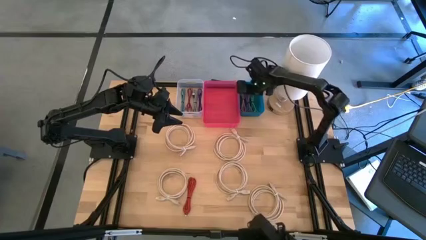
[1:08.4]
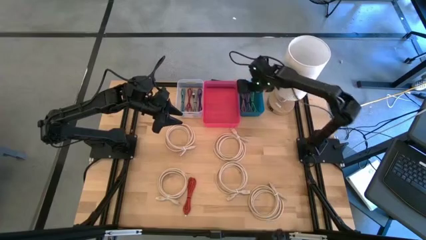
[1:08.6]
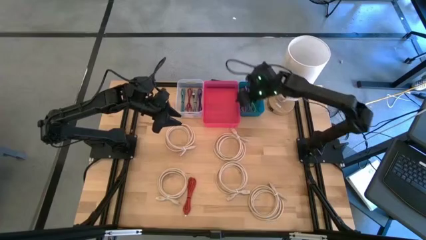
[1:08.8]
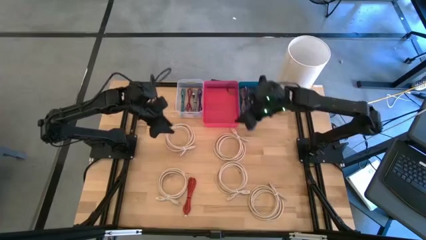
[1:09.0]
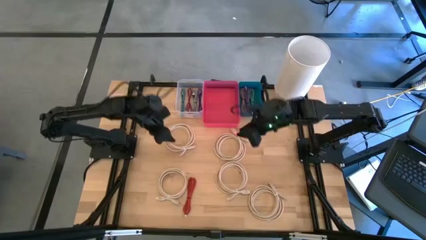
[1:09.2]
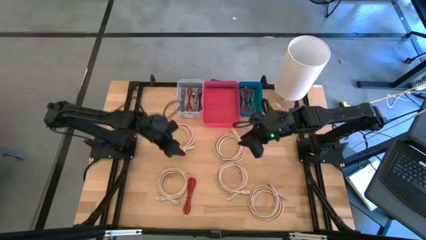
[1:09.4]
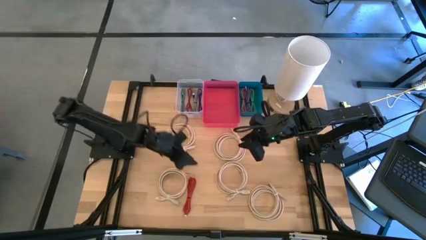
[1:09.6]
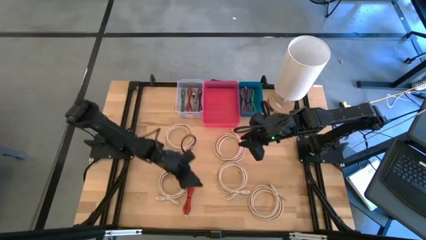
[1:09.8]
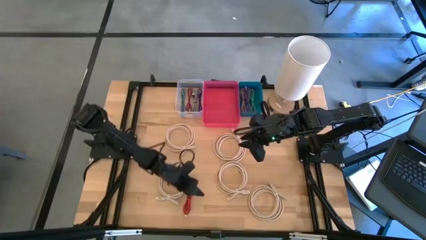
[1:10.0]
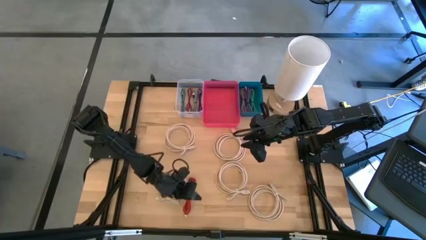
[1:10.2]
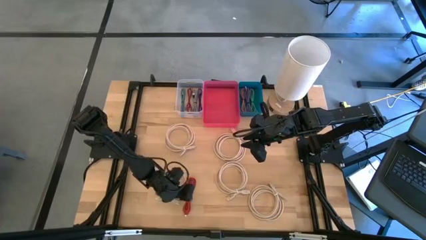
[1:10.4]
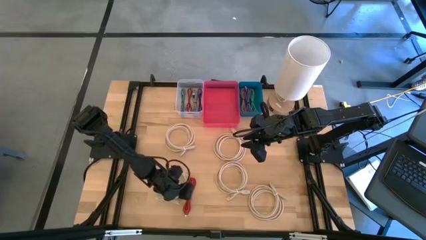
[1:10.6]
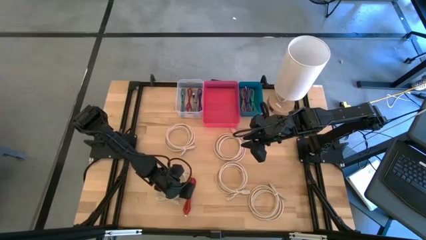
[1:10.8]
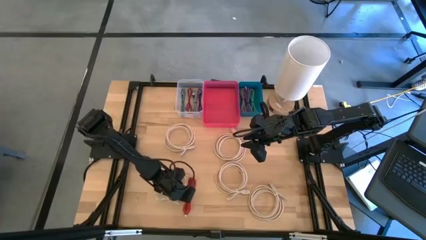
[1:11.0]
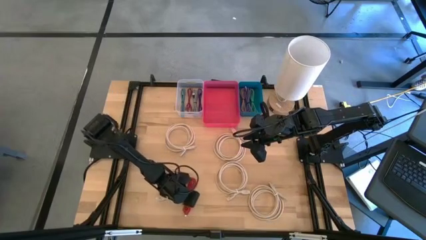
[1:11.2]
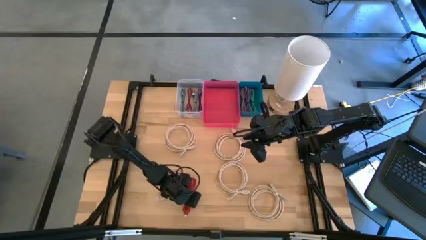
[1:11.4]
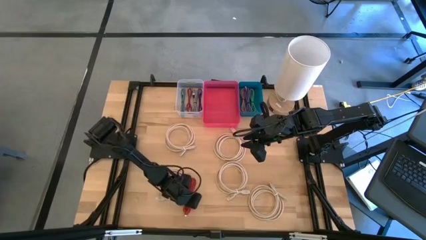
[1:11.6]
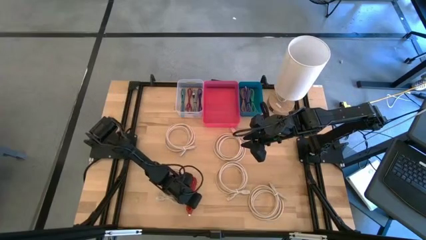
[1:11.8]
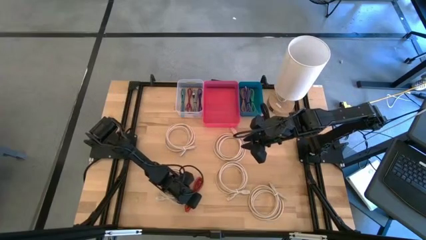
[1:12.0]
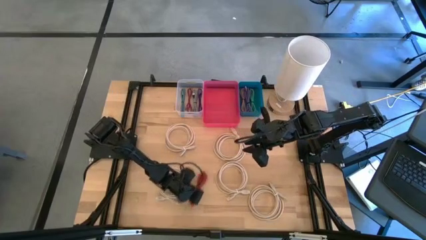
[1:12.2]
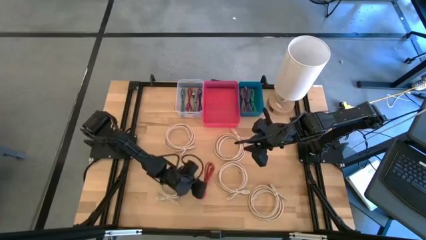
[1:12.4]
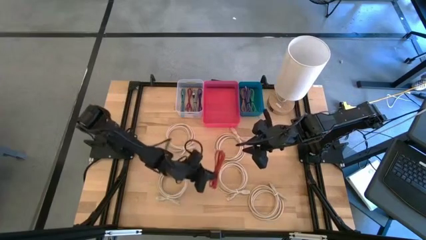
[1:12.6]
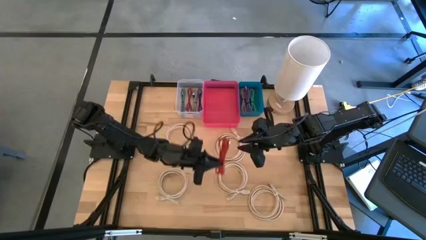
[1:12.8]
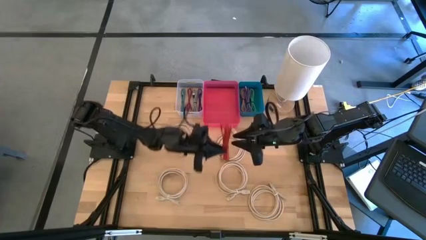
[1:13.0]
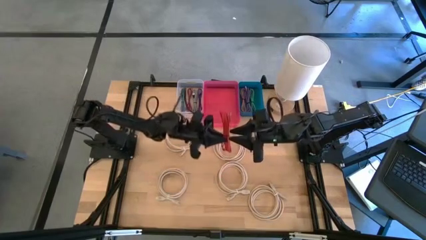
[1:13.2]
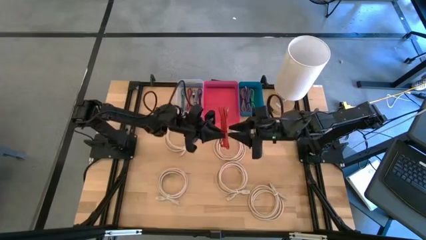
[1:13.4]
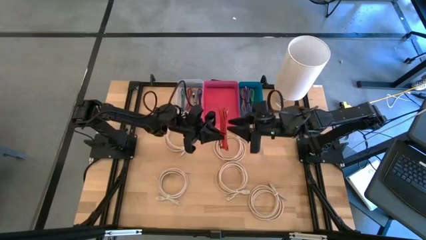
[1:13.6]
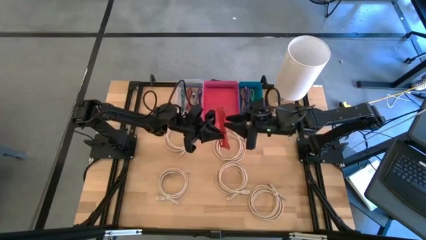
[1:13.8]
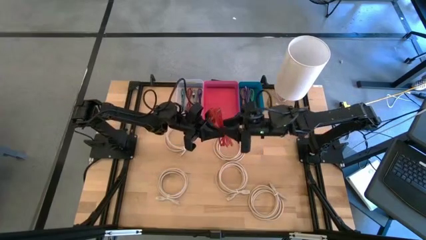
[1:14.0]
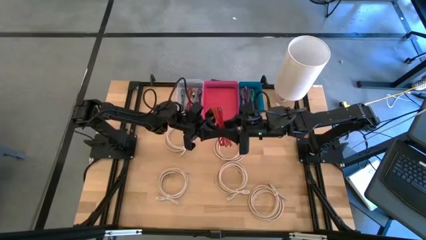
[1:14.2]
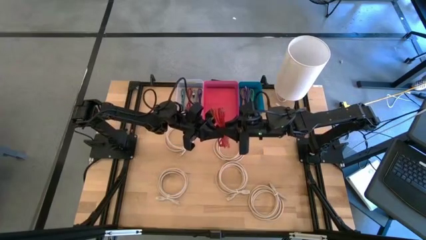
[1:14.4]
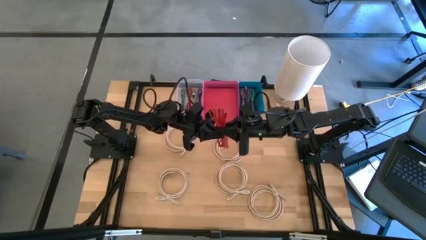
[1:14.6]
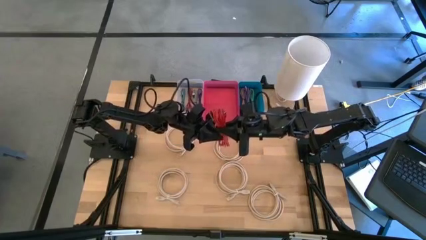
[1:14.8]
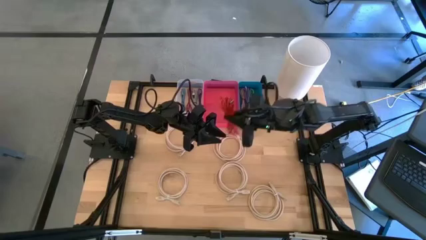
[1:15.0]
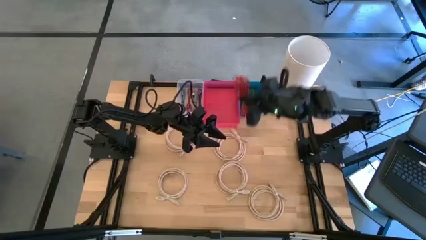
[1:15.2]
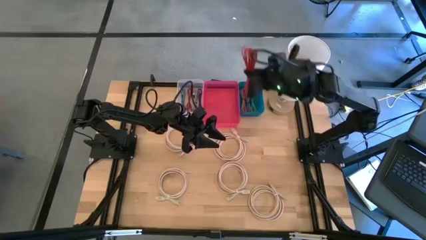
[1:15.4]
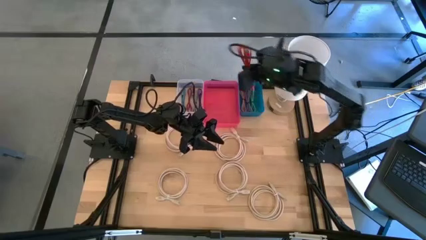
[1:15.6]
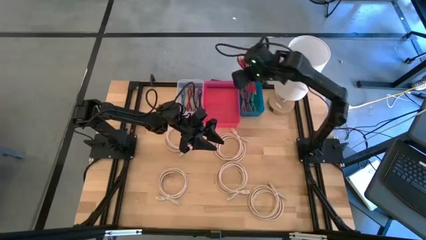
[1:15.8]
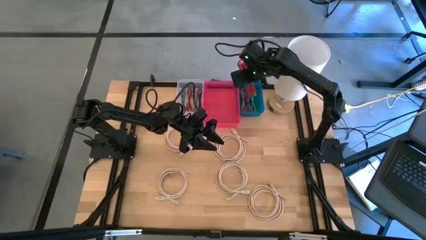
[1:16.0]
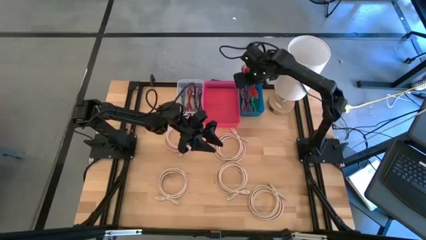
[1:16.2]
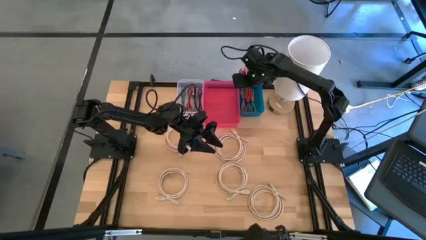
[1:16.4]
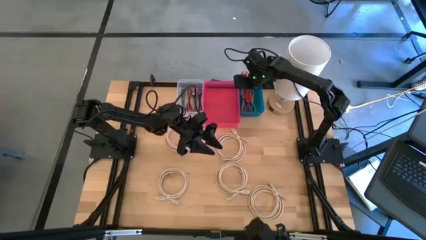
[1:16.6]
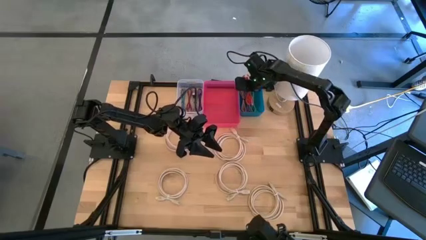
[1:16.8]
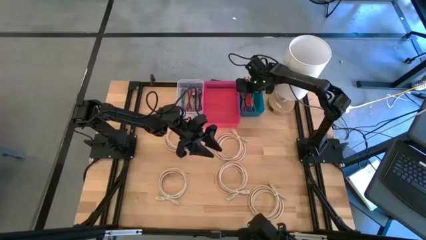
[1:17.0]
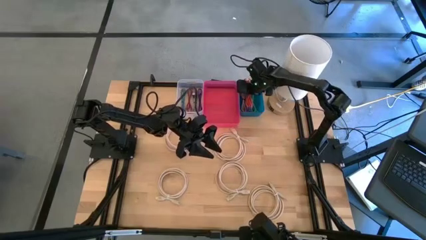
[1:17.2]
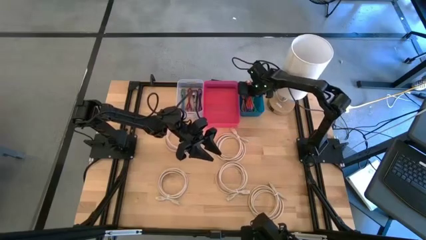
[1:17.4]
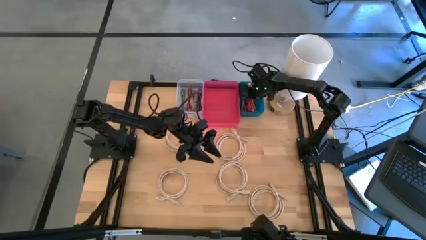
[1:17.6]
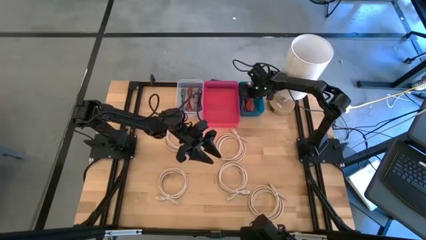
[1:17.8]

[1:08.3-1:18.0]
Task: Pick & Place USB Port
Put the red USB cable into the blue bin

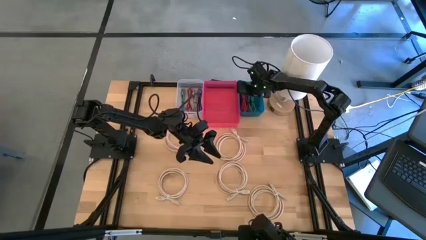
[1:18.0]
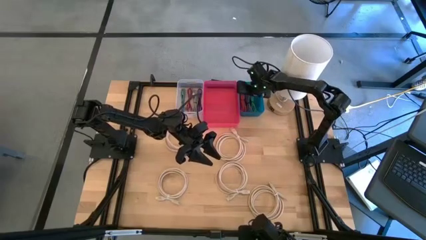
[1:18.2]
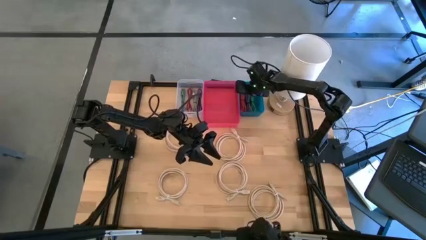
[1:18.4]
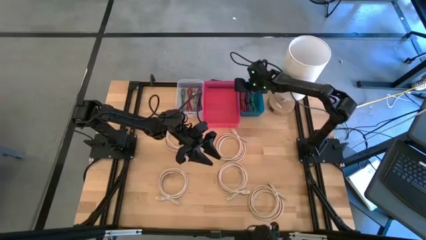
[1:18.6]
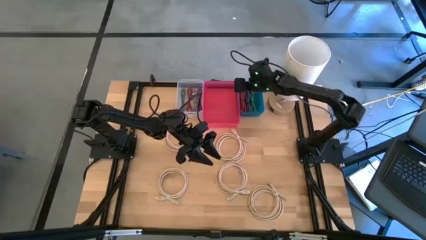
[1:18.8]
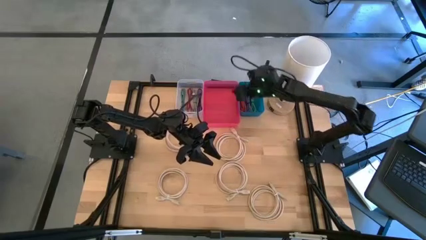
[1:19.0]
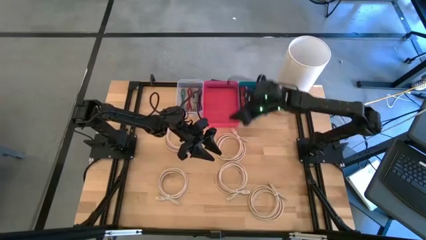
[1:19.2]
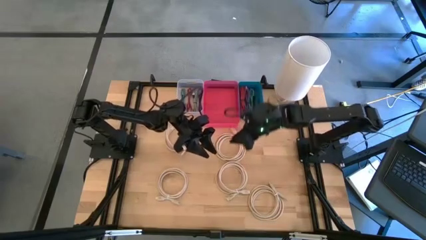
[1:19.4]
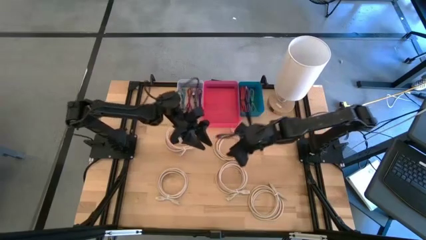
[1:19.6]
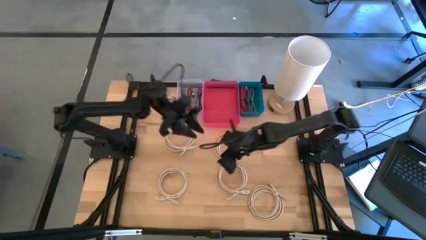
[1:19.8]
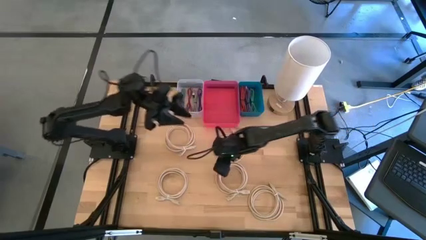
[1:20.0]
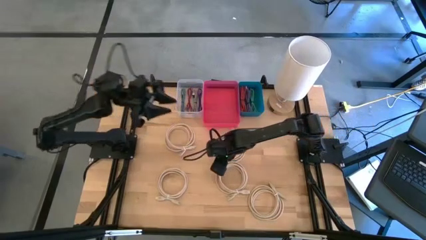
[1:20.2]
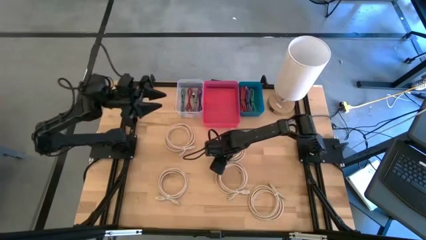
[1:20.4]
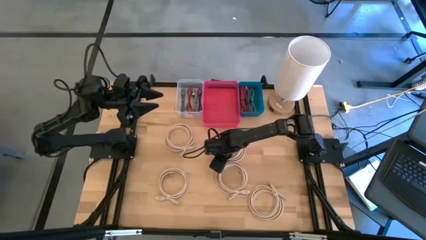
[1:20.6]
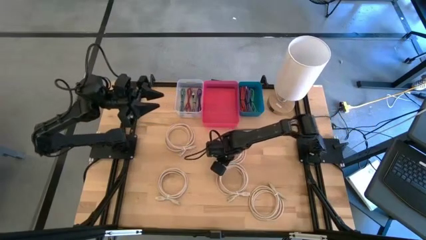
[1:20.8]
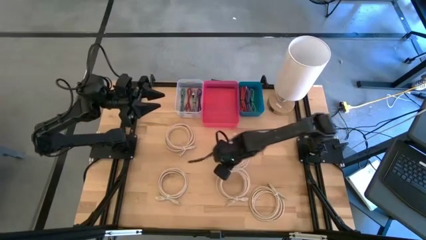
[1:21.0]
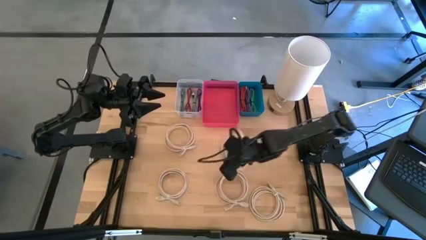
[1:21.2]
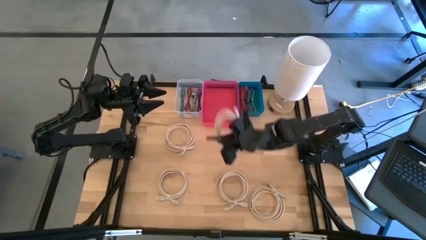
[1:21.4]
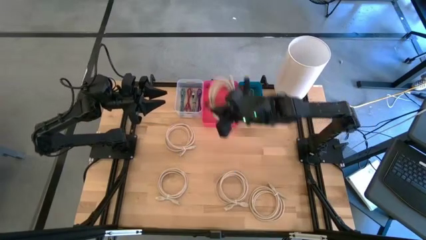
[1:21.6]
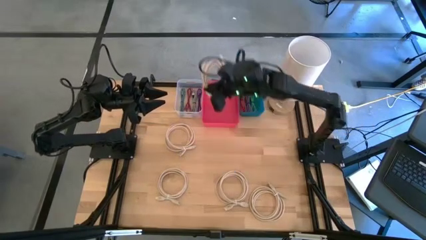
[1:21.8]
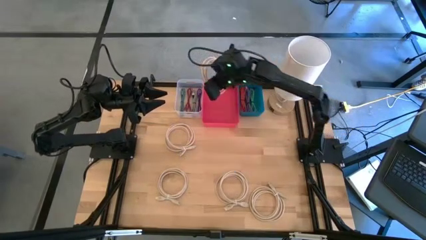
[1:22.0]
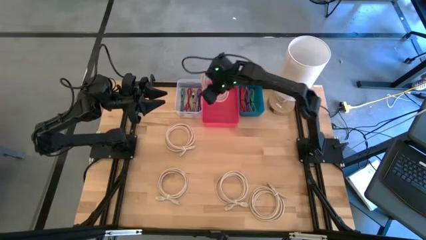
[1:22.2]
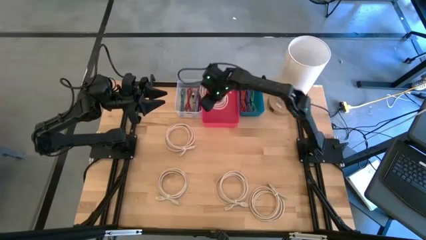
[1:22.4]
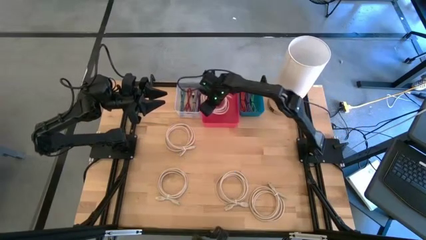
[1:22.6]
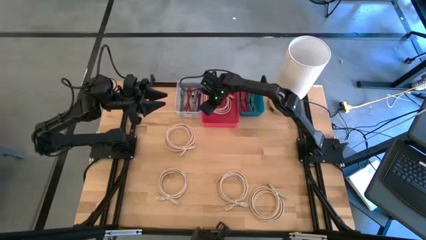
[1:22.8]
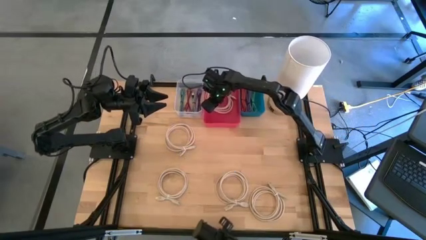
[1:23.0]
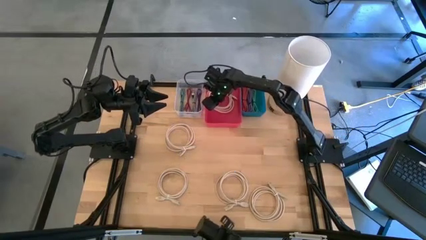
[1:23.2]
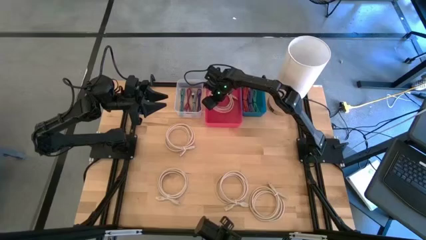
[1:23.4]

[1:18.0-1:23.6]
Put the white USB cable into the red bin

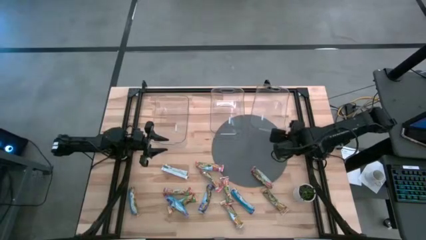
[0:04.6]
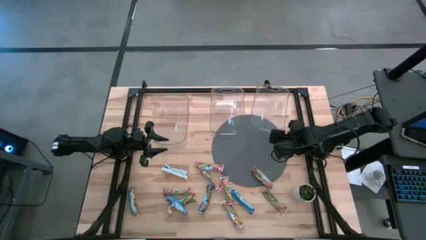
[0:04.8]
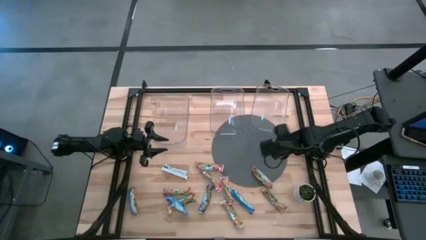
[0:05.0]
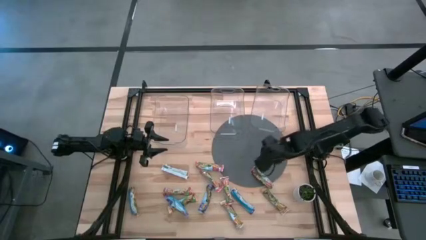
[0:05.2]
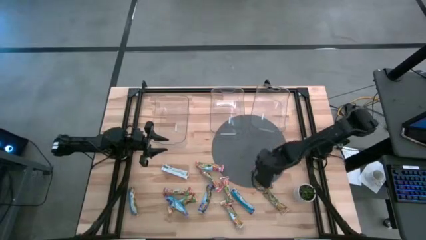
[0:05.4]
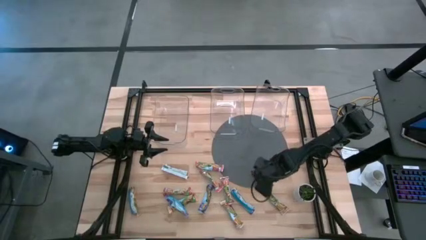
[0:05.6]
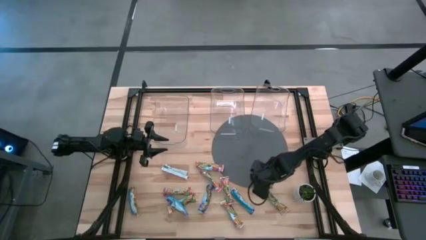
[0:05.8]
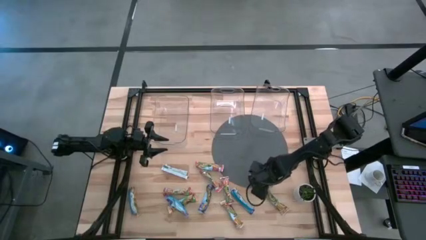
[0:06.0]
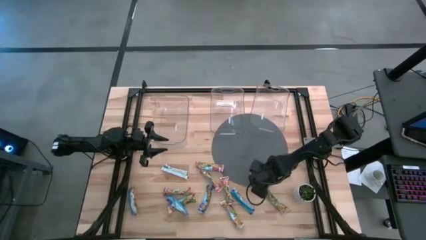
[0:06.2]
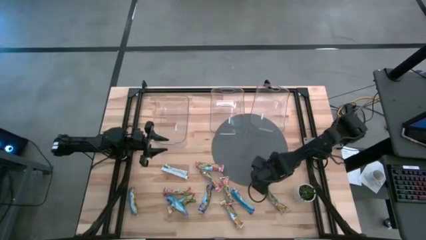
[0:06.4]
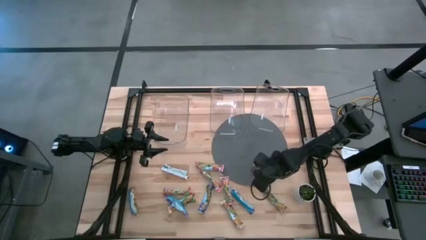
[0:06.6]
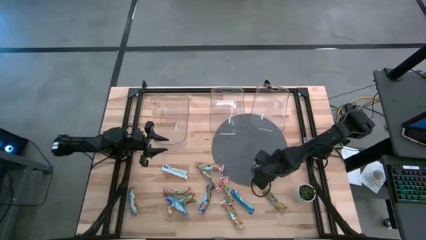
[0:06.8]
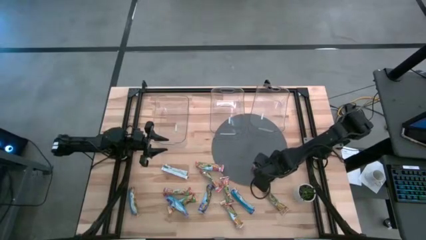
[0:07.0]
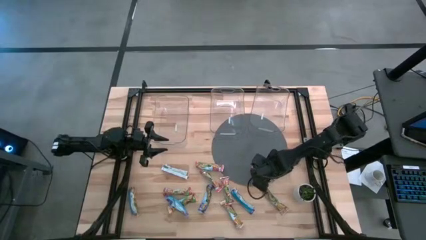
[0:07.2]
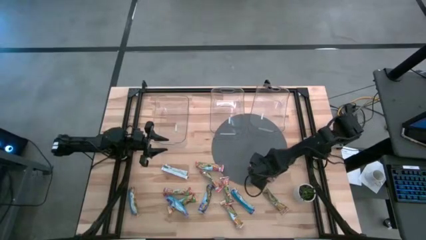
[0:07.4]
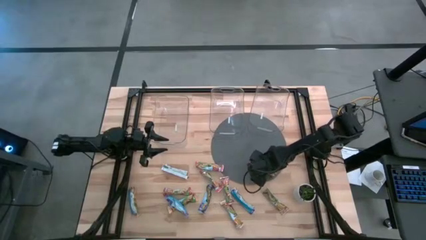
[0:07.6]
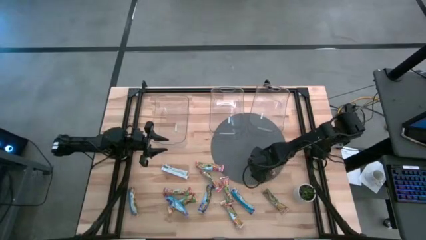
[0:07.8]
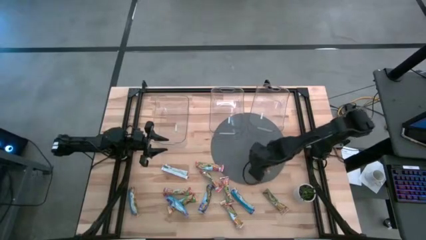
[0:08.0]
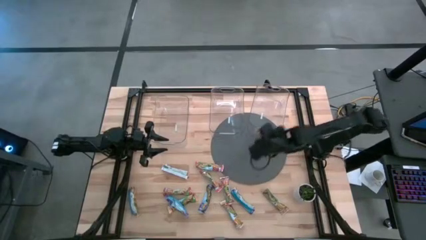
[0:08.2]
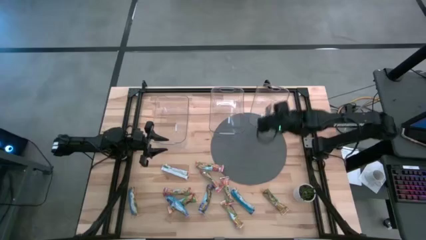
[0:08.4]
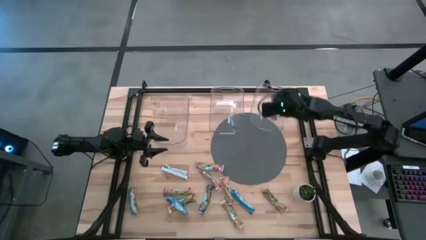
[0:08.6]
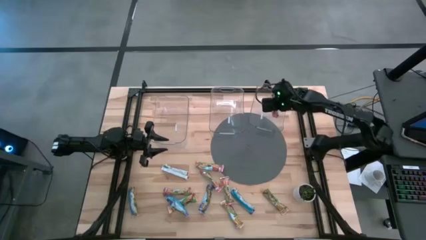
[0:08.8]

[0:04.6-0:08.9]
Task: Pick and place Granola Bars by type
Put the red granola bar into the right transparent bin
